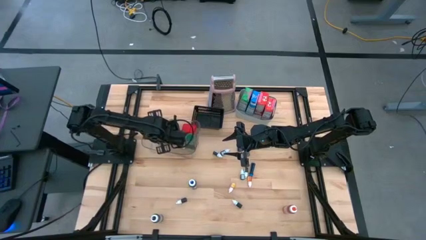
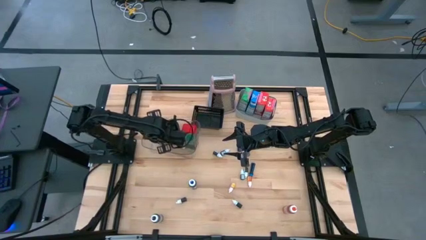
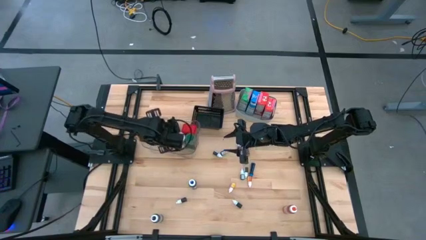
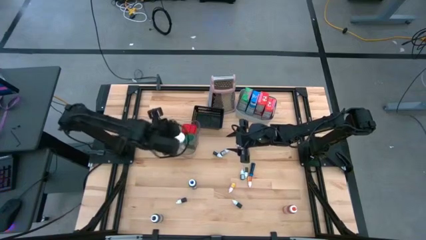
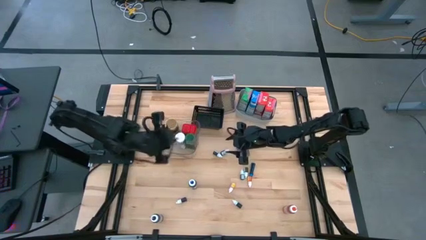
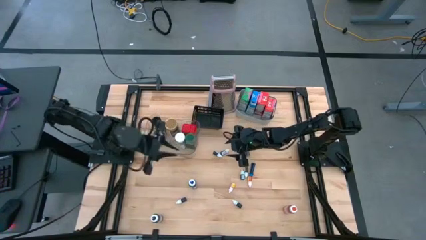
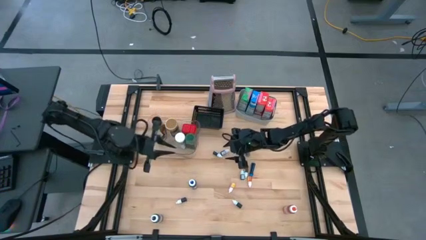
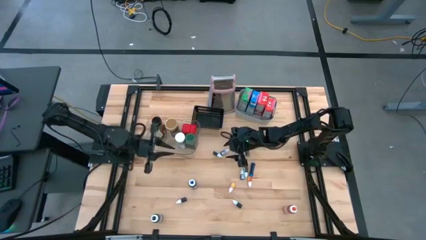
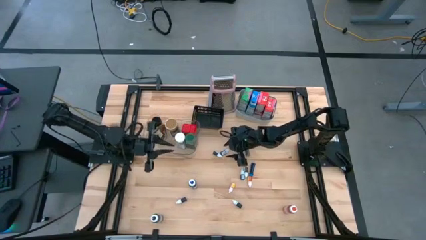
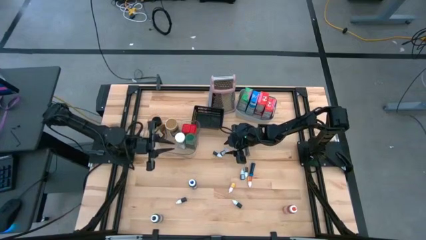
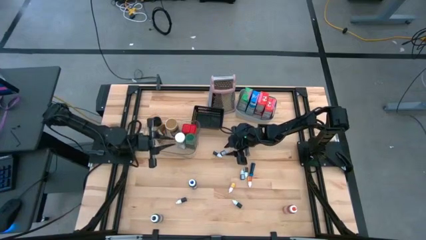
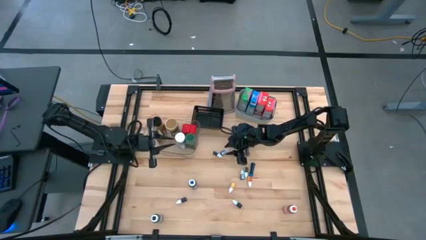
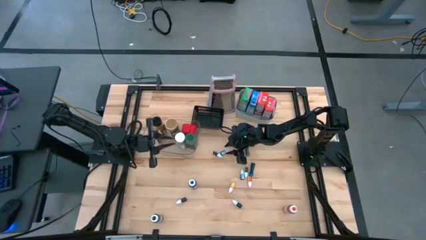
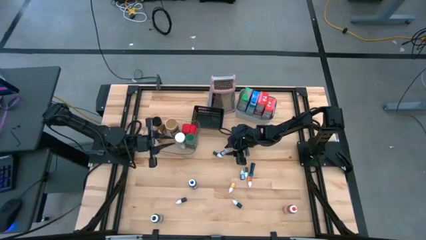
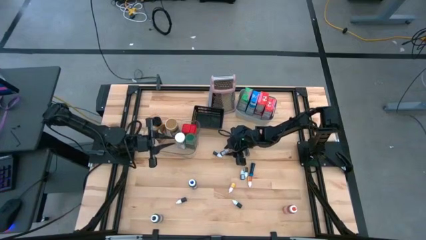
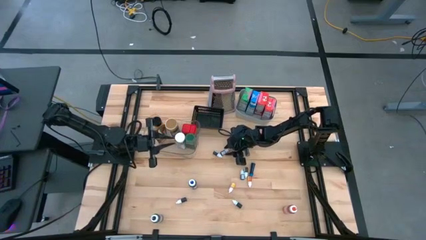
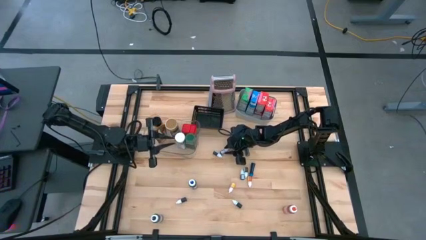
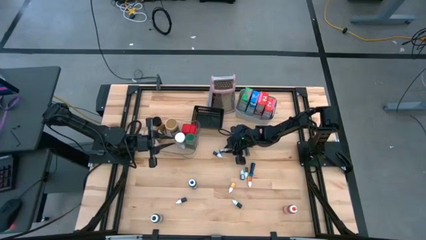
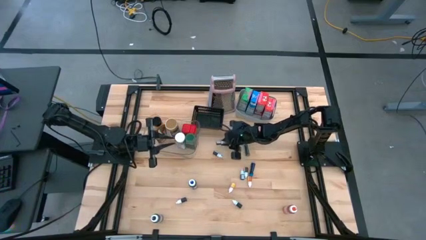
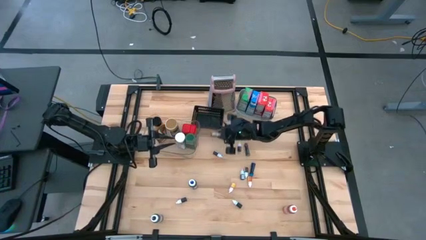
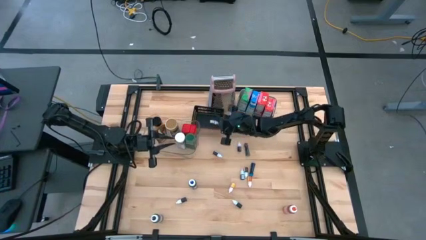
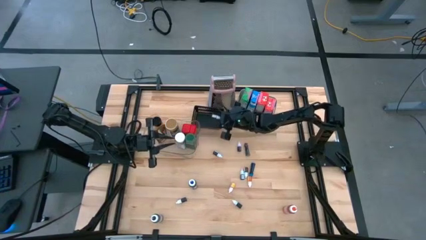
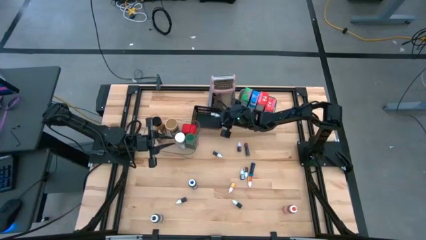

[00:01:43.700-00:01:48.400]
Task: Pick & Place Kitchen Items
Put the small violet food coloring bottle into the black bin

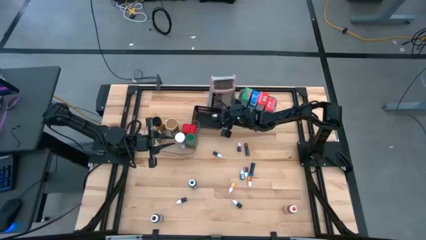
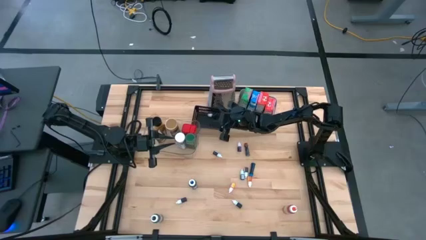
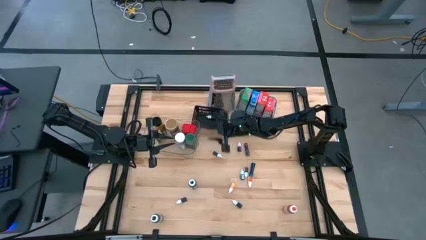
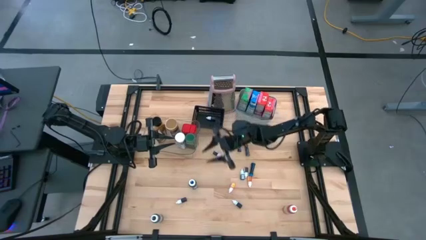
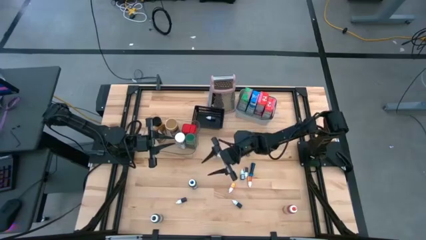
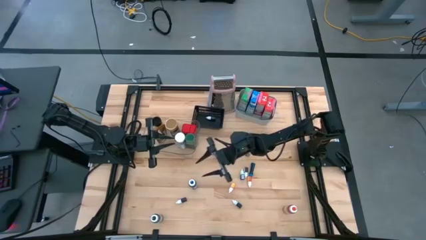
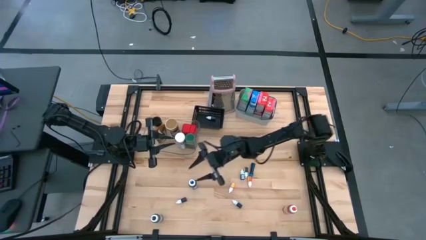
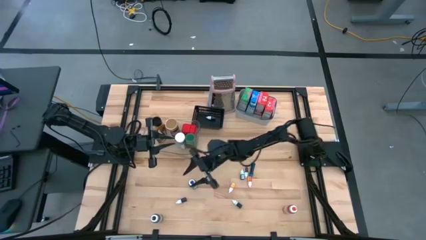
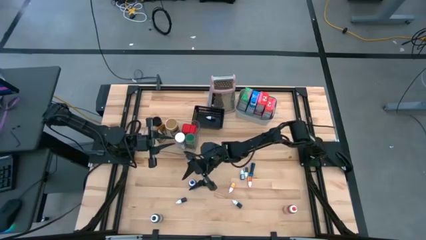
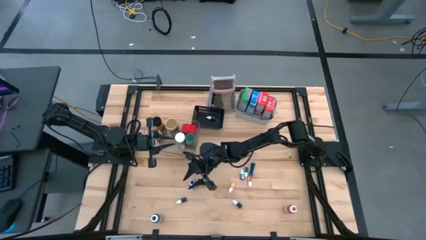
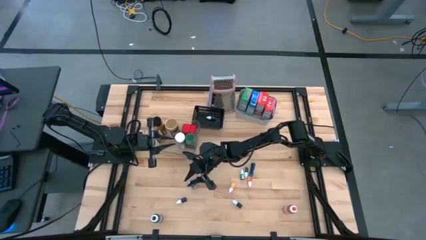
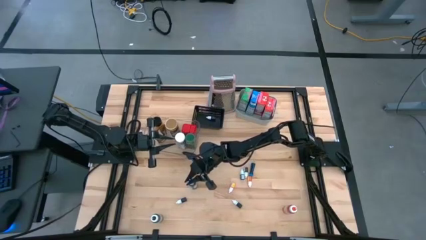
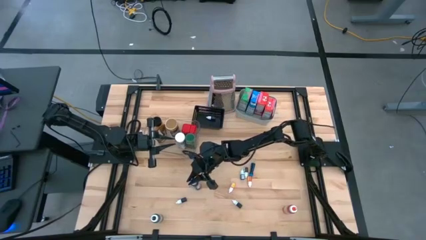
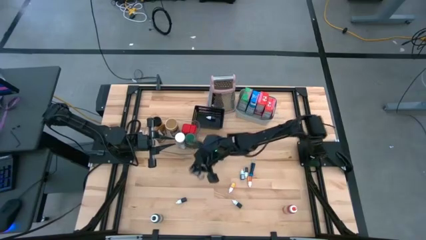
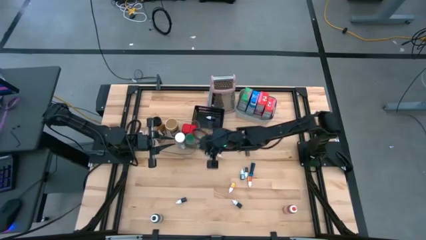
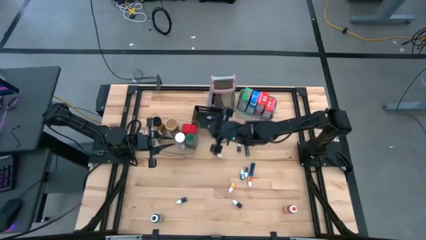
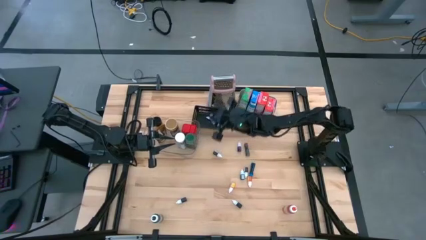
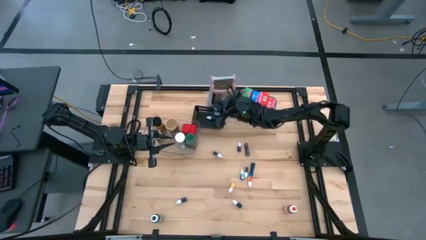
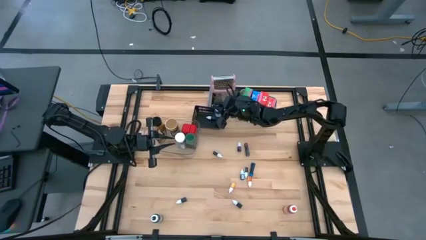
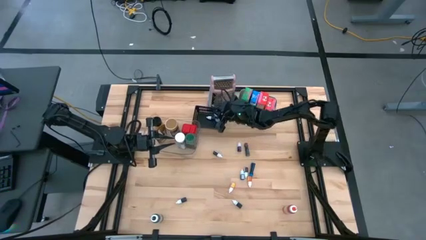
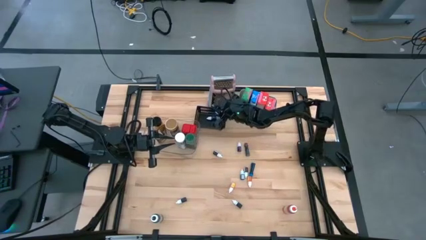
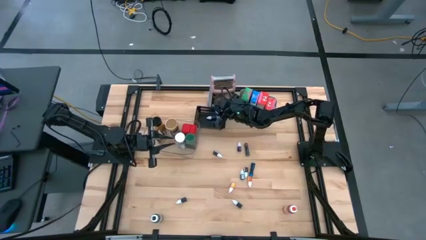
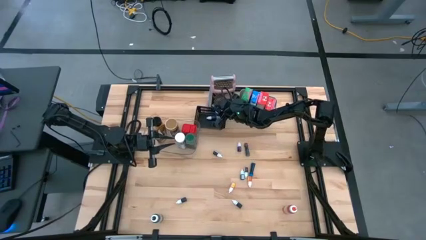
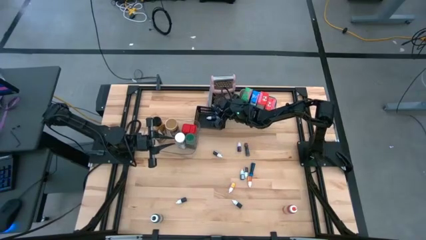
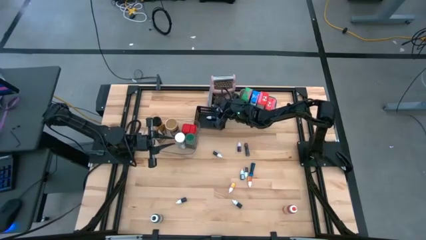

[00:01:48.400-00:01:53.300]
Put the large blue food coloring bottle into the black bin

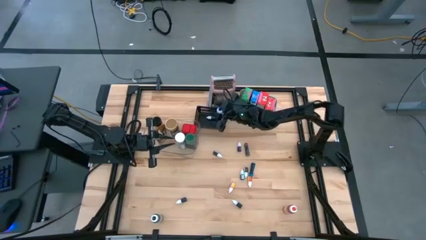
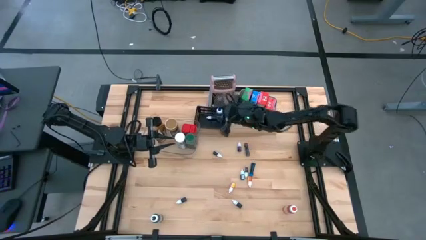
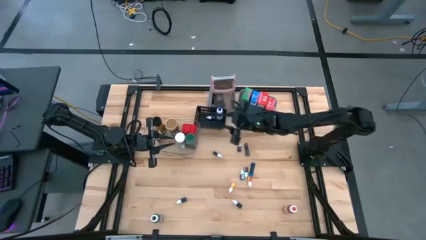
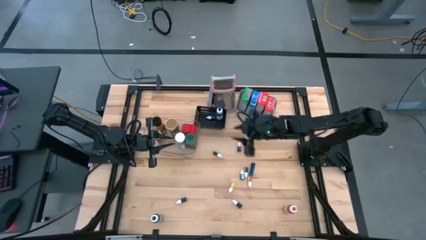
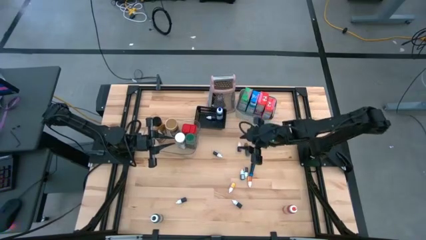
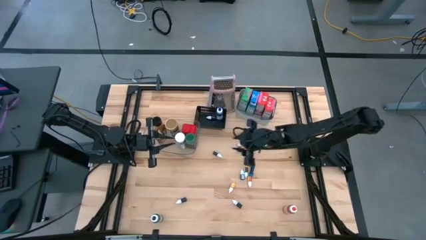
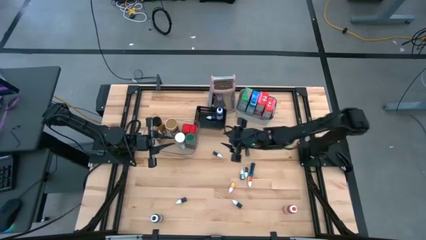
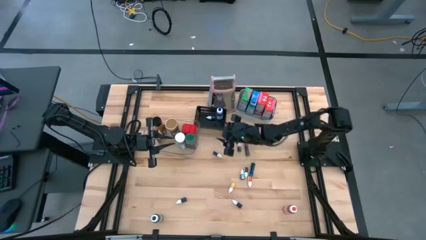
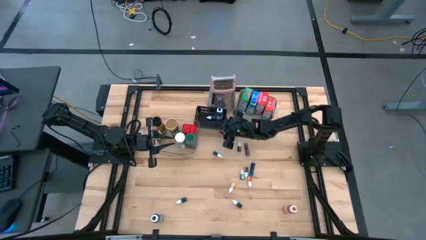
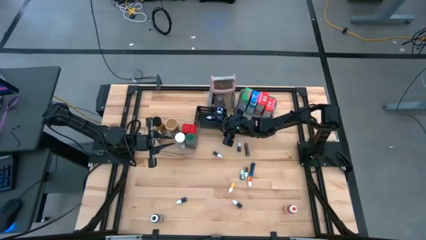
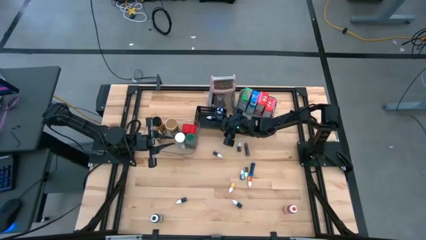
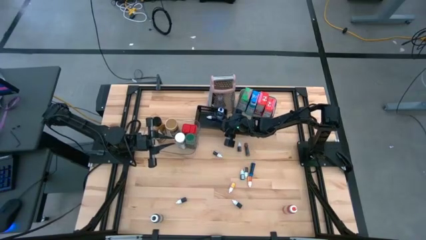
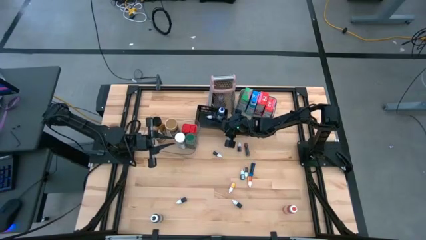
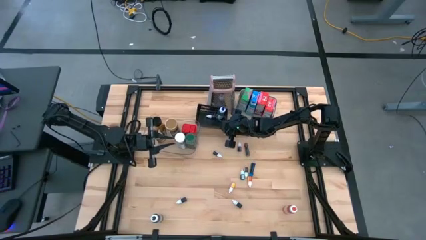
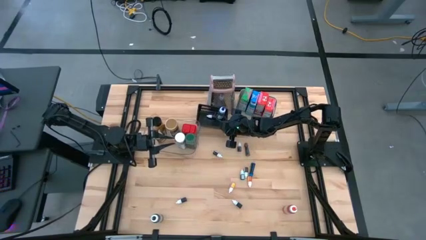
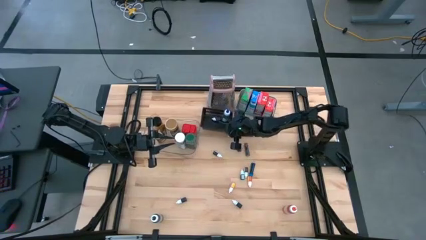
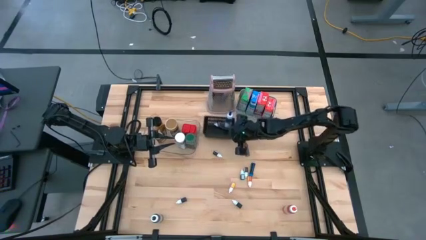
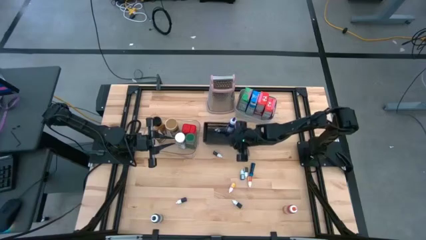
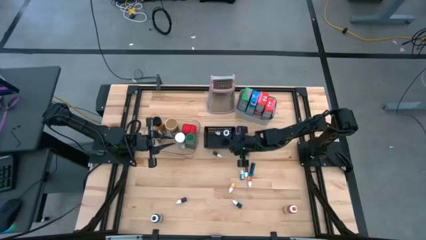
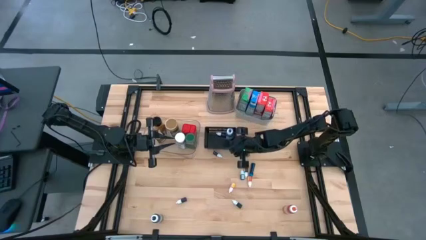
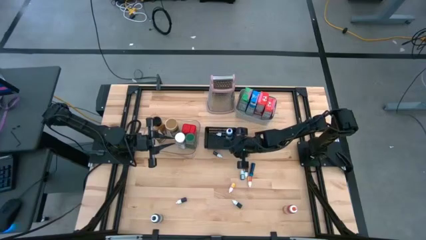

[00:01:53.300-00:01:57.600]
Move the black transparent bin to the top center of the table

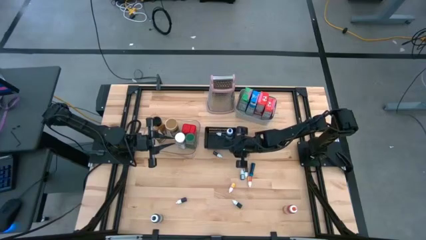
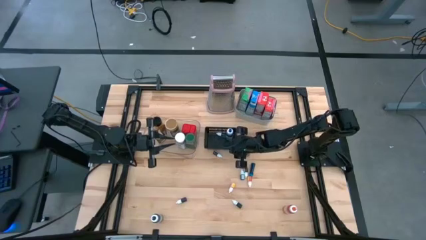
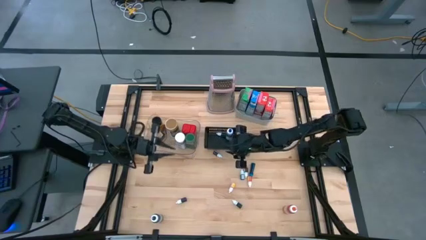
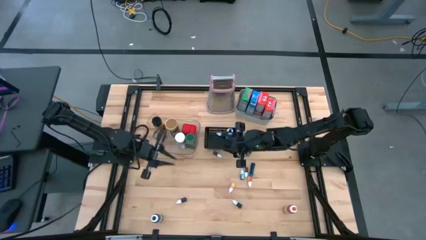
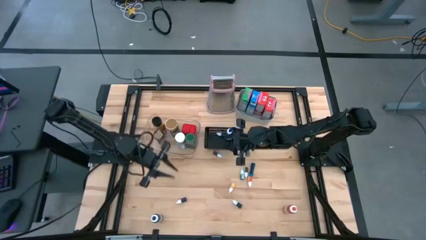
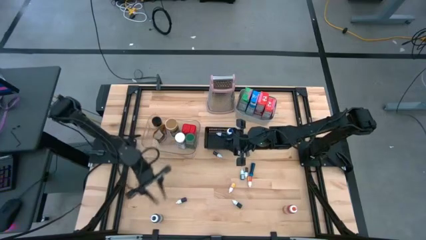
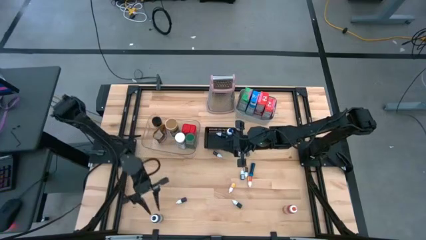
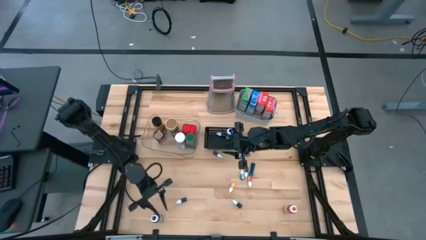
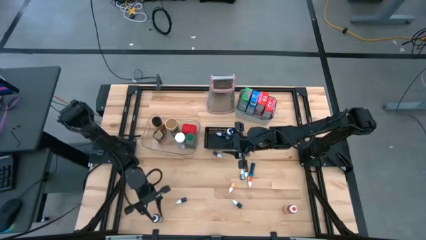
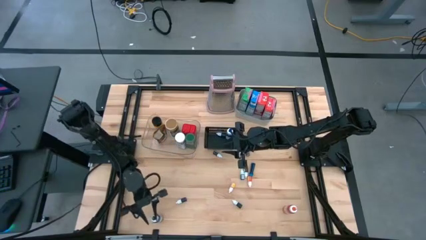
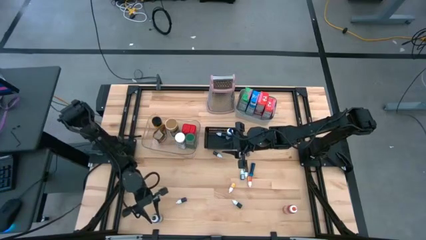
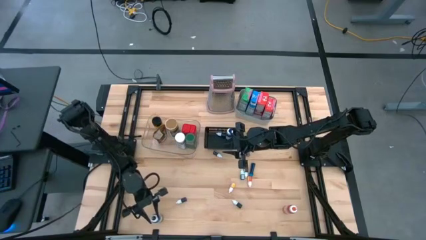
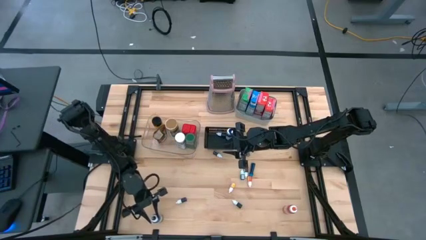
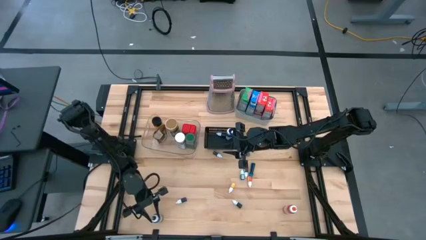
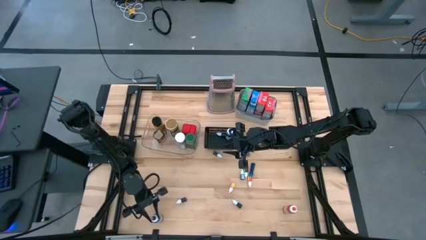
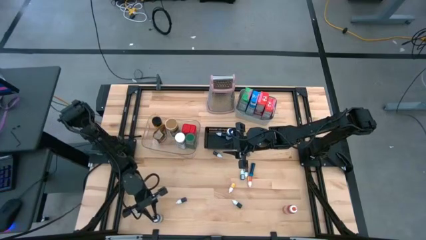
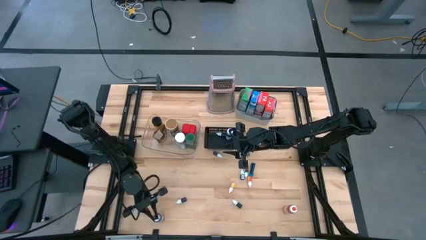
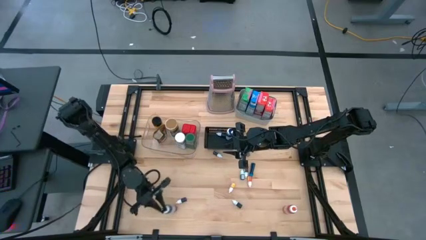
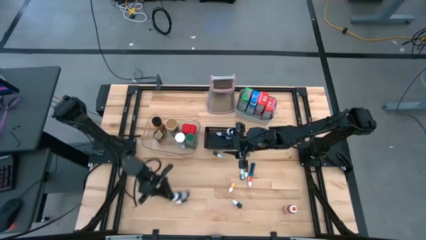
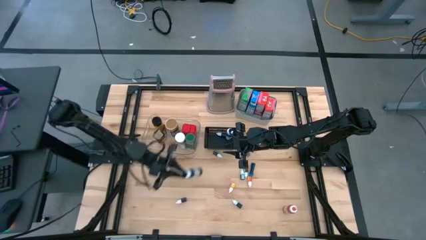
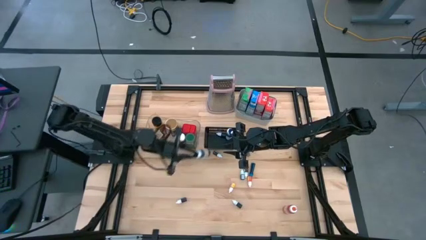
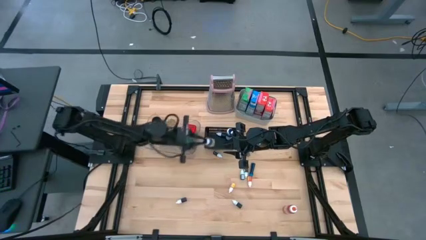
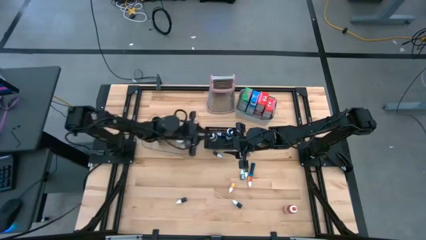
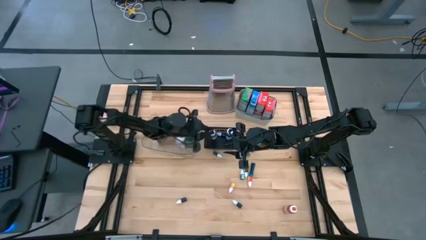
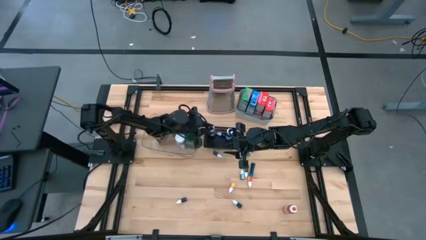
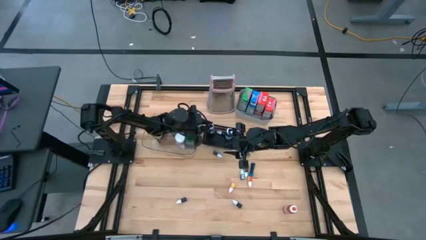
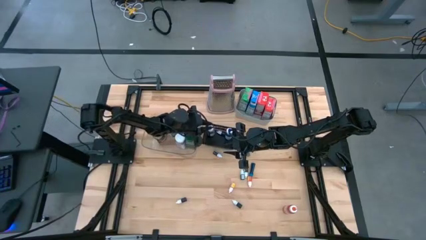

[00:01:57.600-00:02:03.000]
Put the large black food coloring bottle into the black bin
